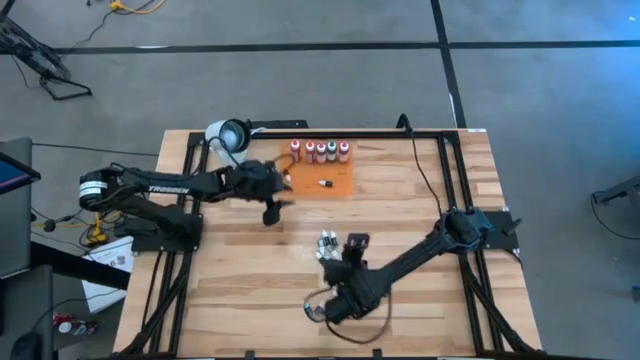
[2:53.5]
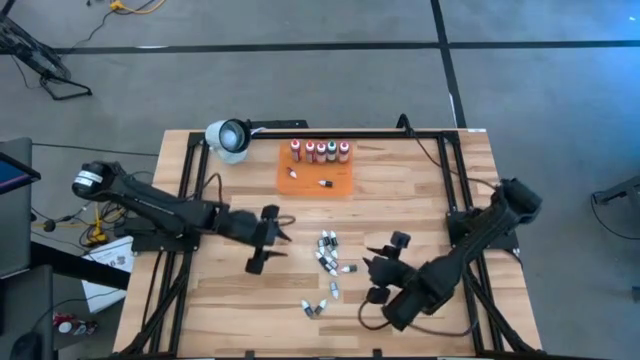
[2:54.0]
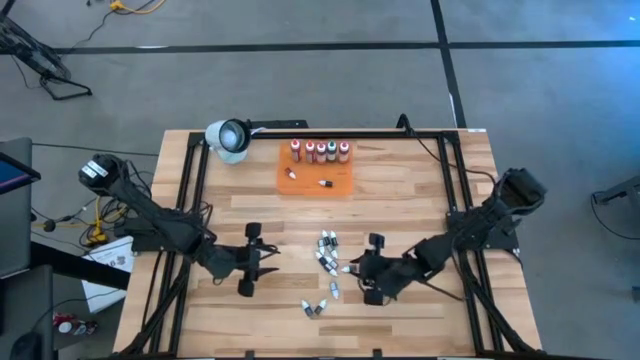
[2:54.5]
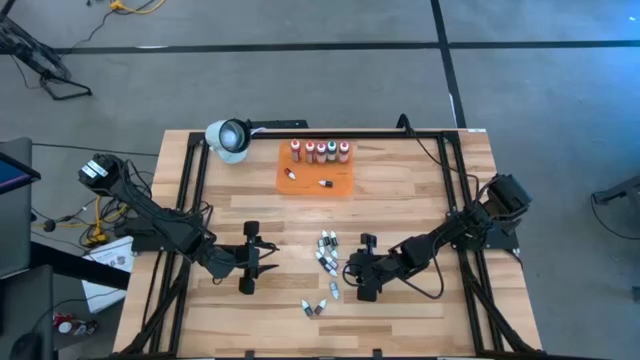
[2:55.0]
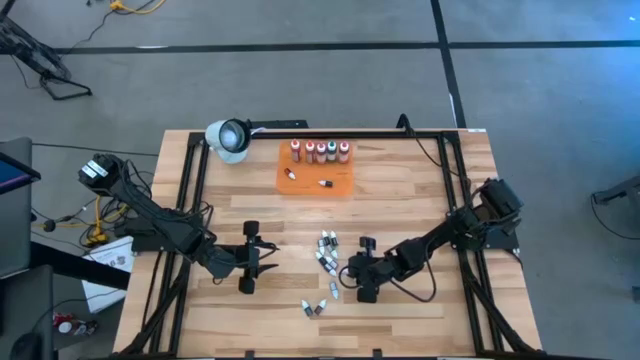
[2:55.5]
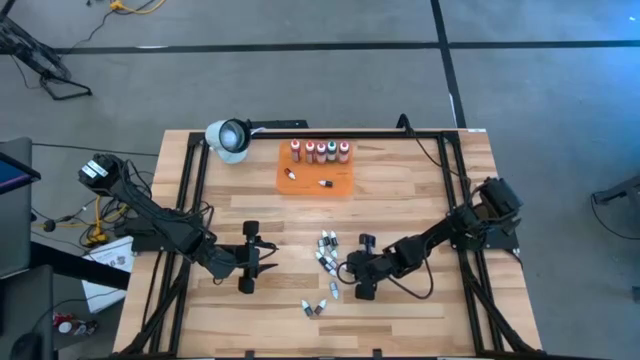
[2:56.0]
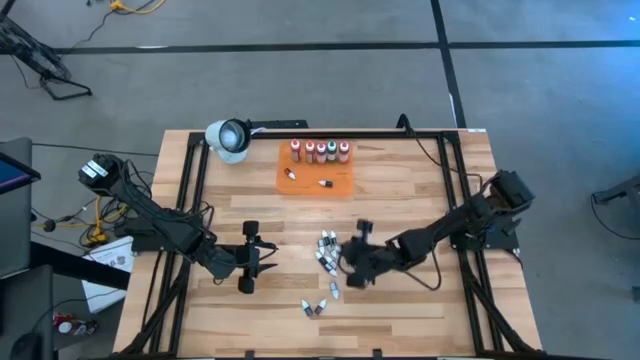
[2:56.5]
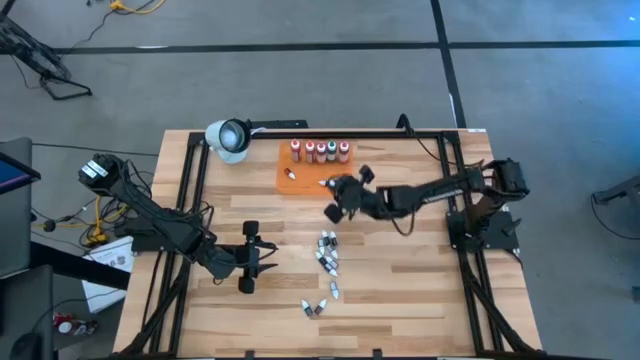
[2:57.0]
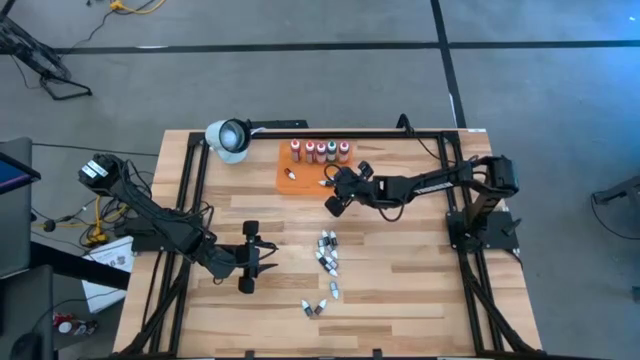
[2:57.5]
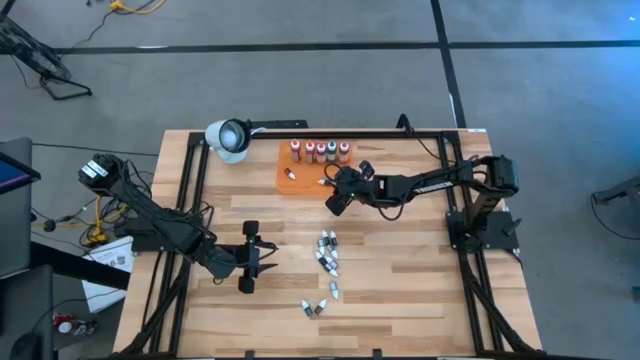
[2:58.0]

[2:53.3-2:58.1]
Task: Pick & Place food coloring
Put the small green food coloring bottle into the orange bin

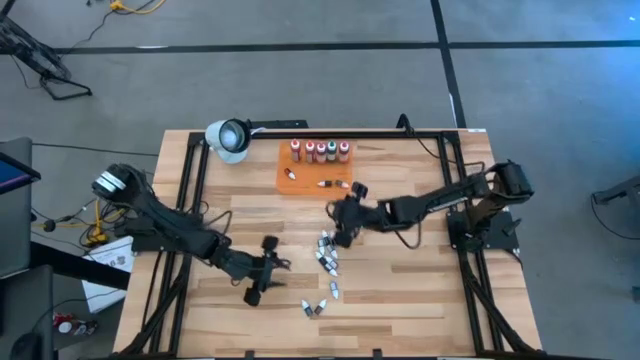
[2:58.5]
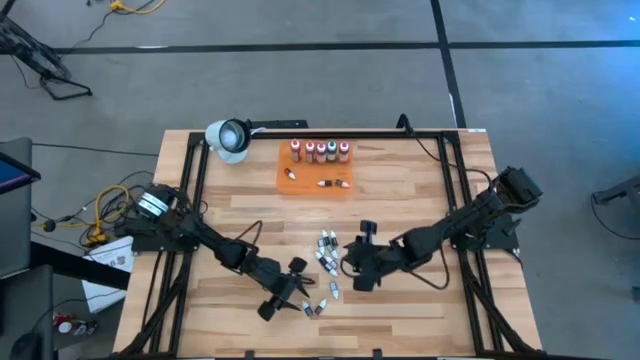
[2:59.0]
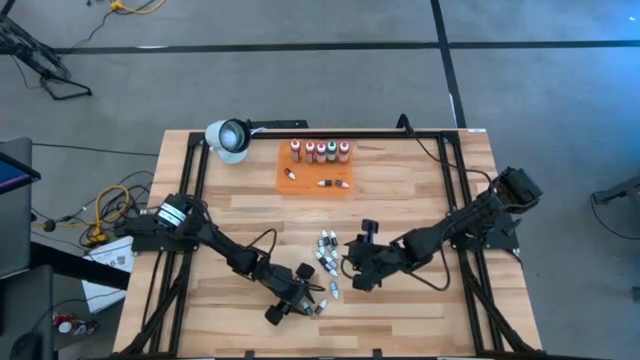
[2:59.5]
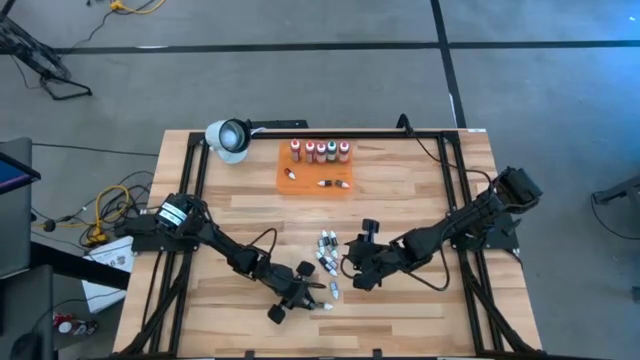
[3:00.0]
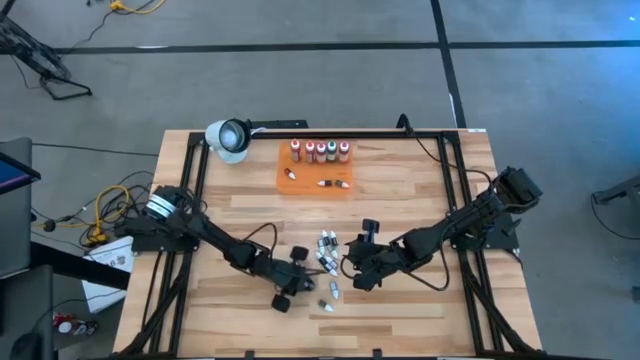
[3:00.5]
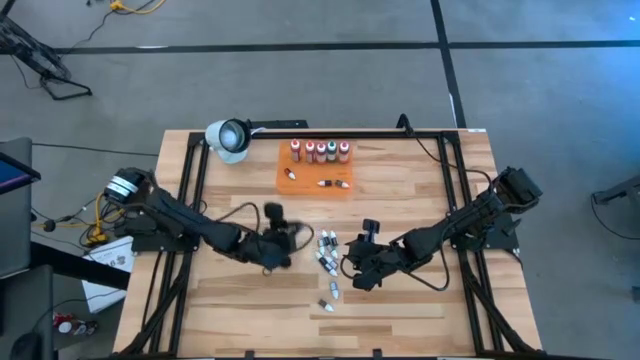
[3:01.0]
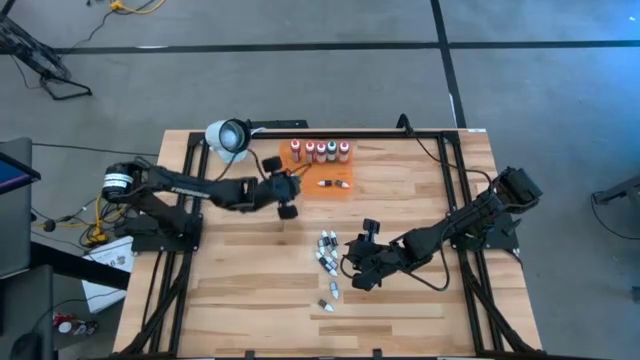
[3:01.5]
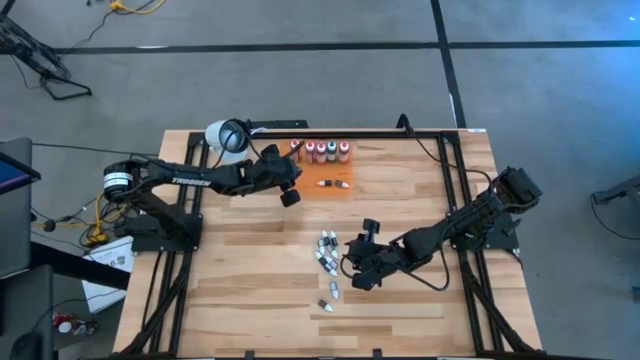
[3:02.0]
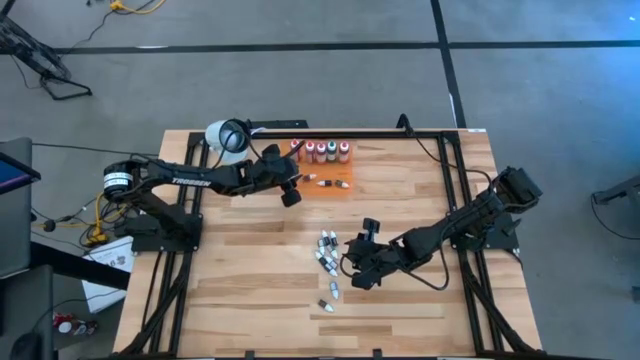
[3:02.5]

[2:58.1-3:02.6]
Put the small purple food coloring bottle into the orange bin

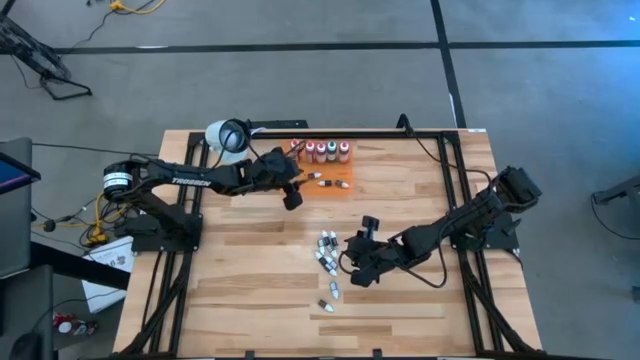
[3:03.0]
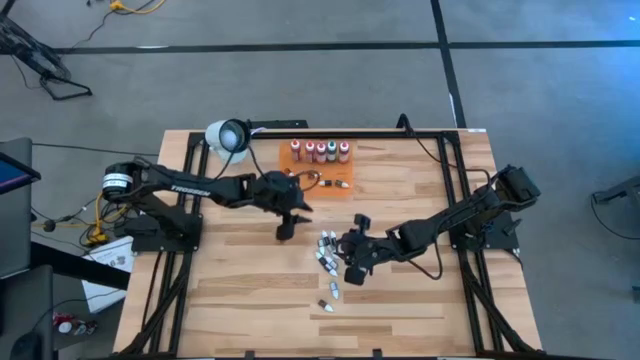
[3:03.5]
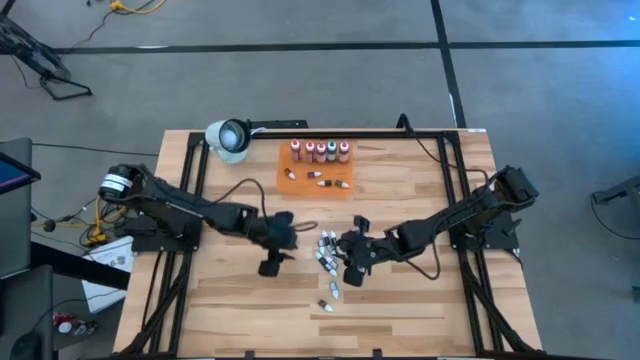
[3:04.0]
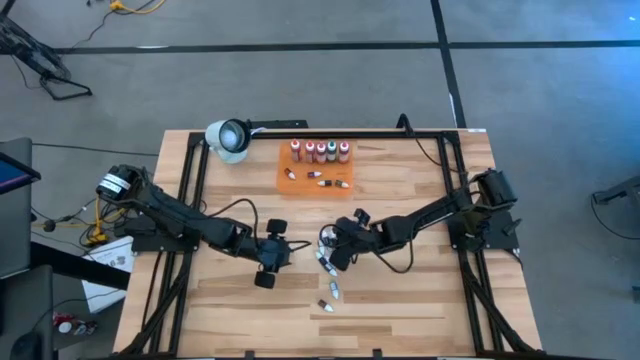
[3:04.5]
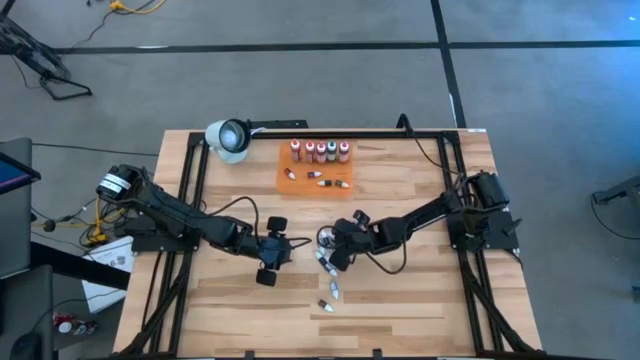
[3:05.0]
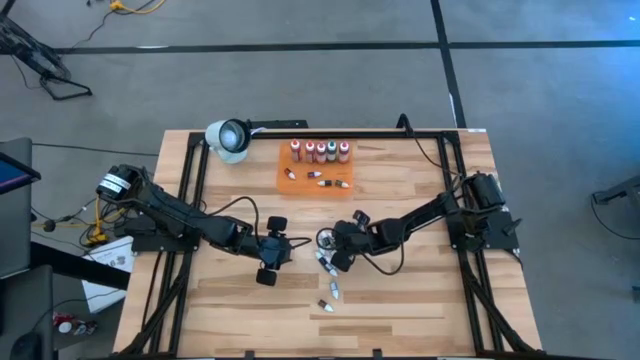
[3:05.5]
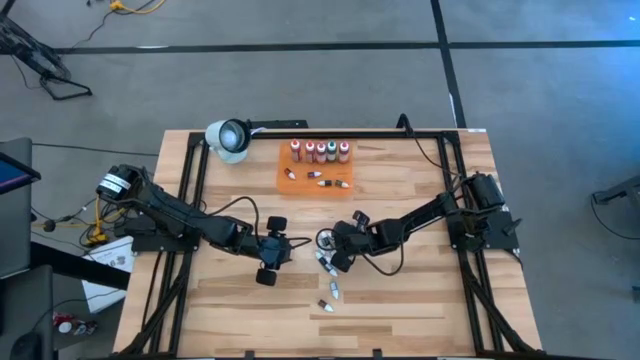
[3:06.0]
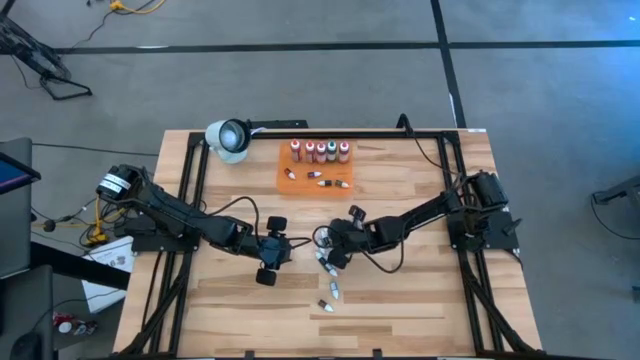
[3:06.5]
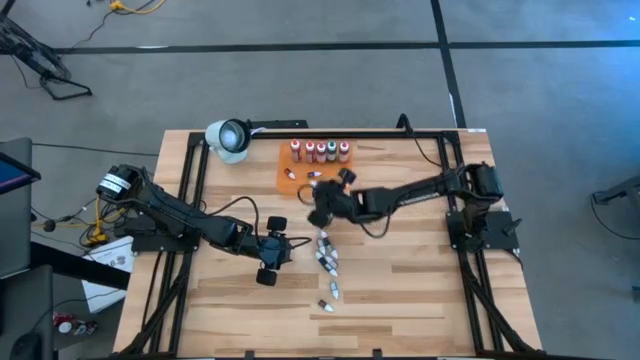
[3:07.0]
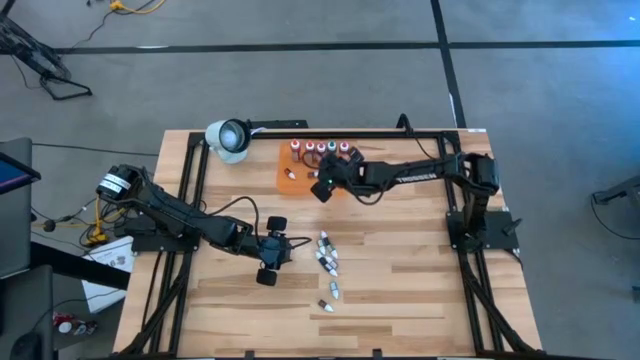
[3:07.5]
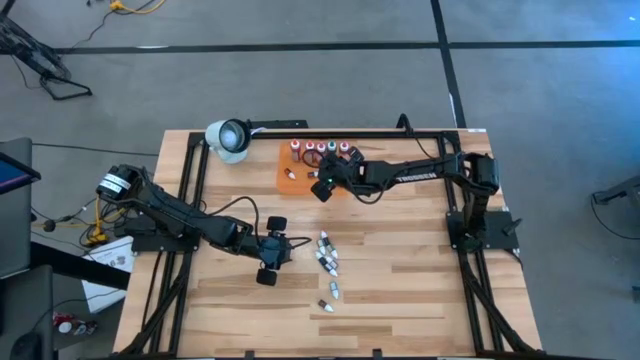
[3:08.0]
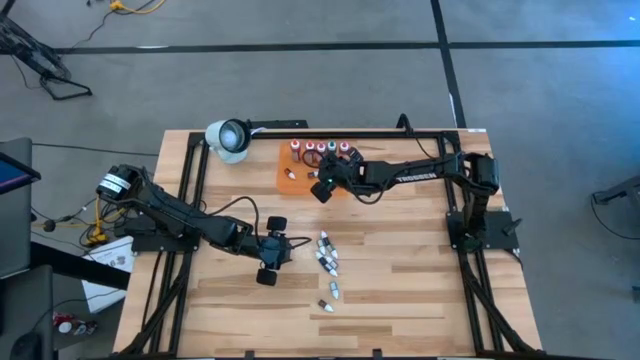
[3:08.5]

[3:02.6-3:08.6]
Put the small black food coloring bottle into the orange bin

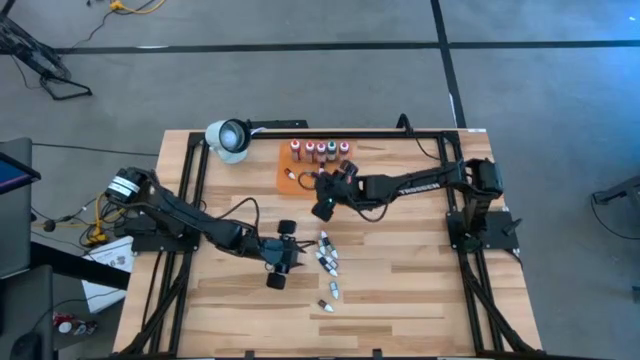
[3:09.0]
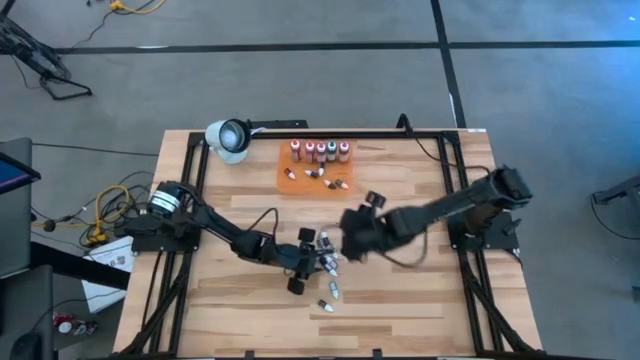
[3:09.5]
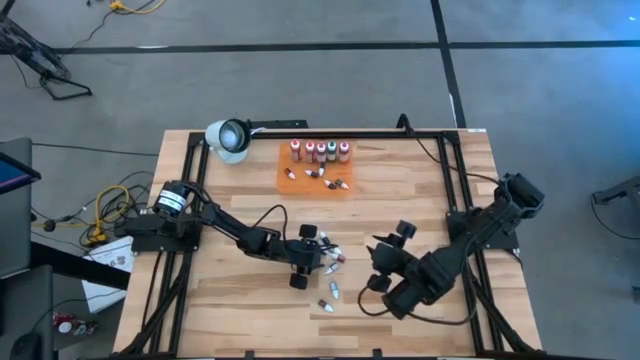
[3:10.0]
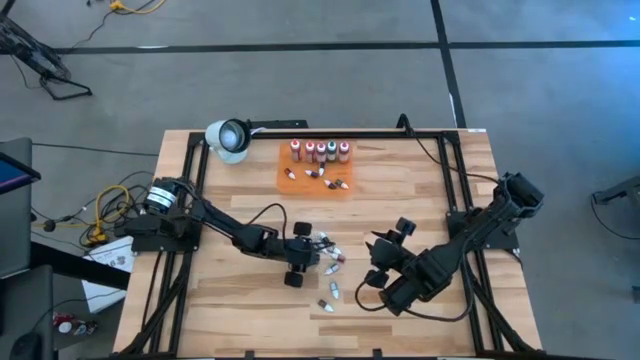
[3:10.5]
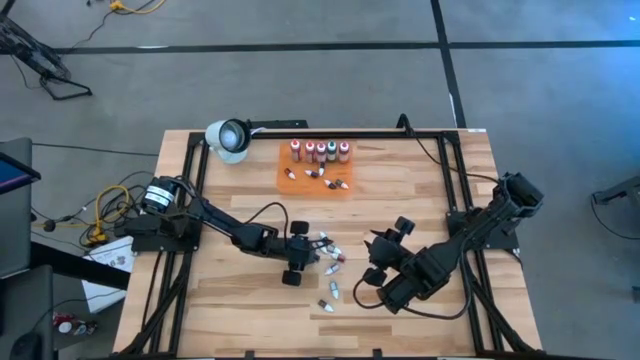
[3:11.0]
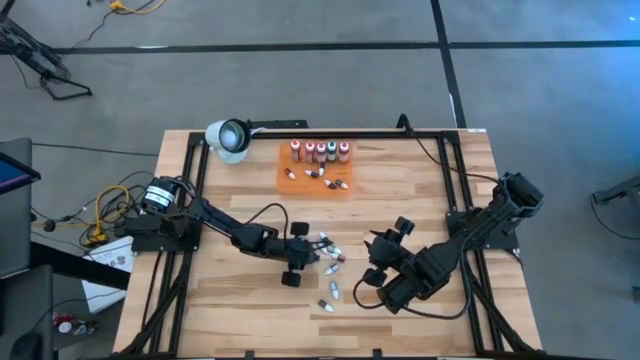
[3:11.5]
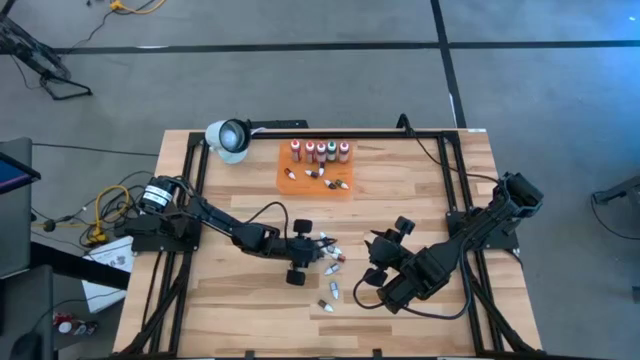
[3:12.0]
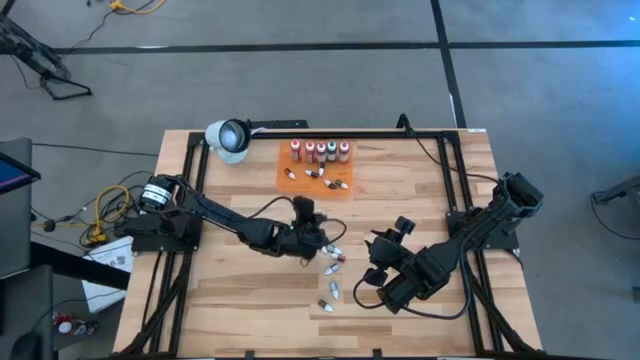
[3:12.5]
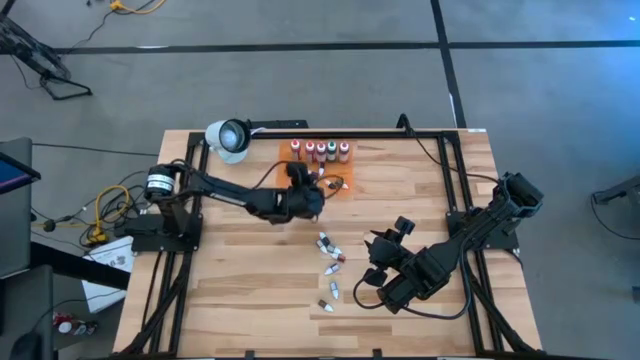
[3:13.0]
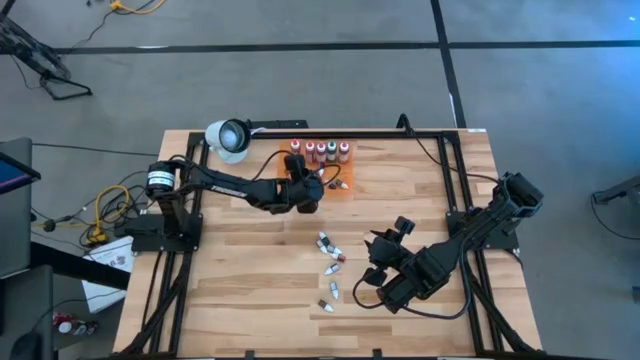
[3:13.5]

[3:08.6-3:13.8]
Put the small black food coloring bottle into the orange bin

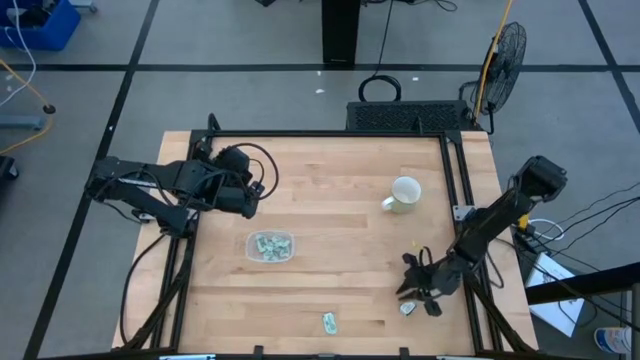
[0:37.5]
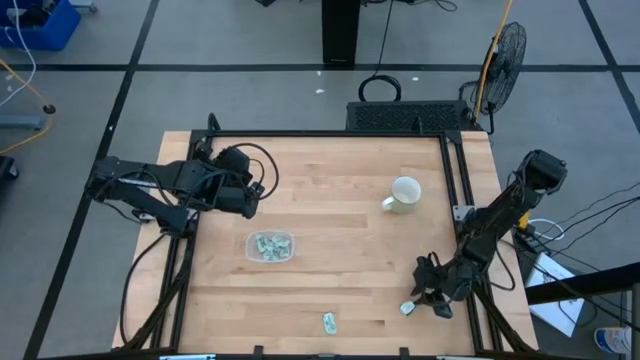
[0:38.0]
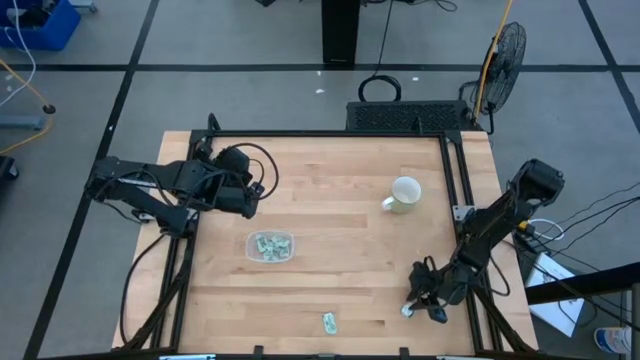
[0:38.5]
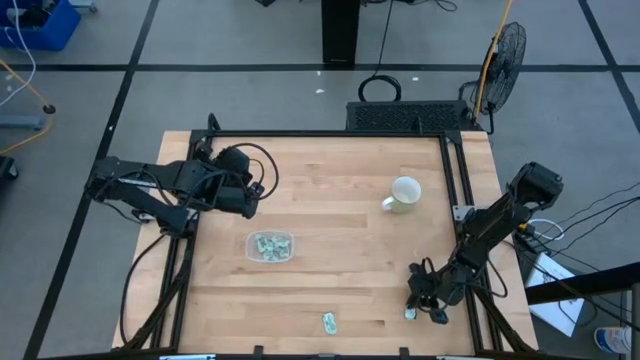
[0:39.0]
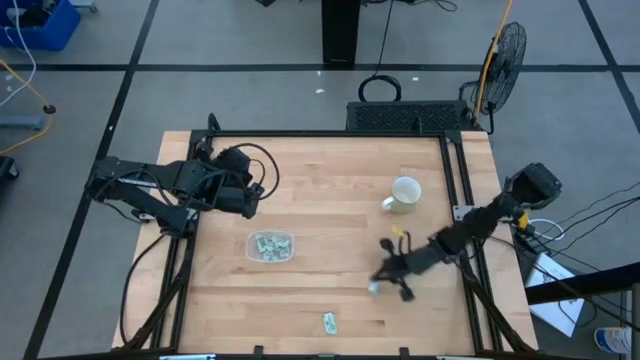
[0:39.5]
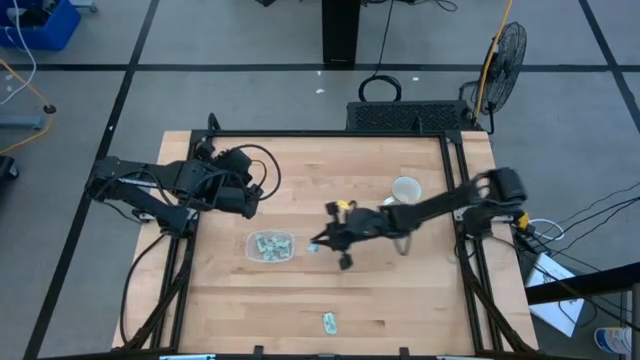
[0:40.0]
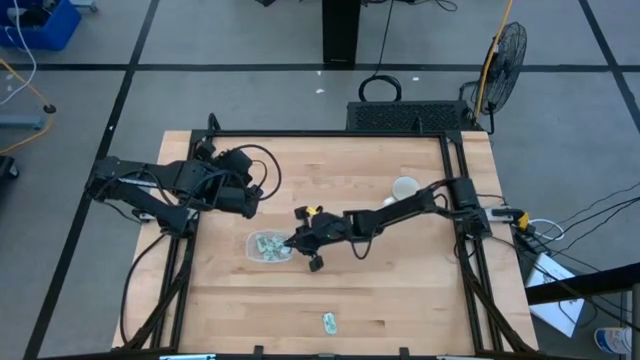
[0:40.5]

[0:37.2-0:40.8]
Task: Pick and place Stevia / Truvia into bins
Put the stevia packet into the transparent bin
